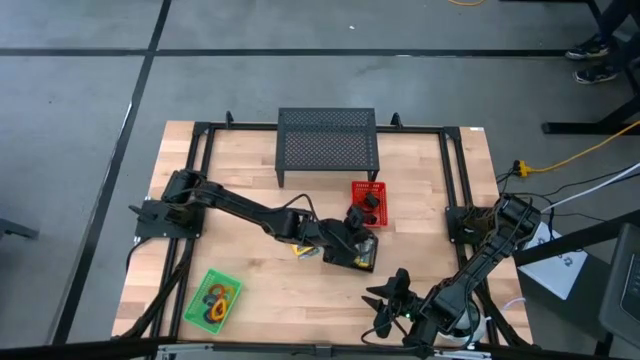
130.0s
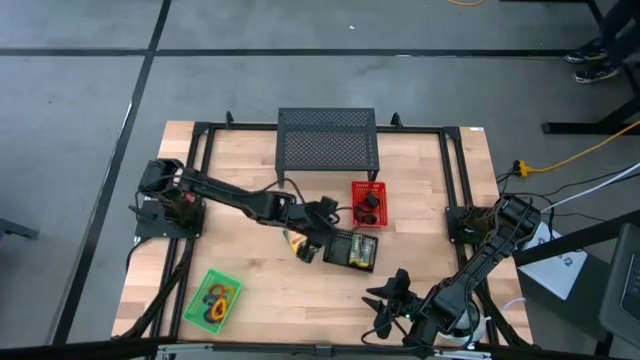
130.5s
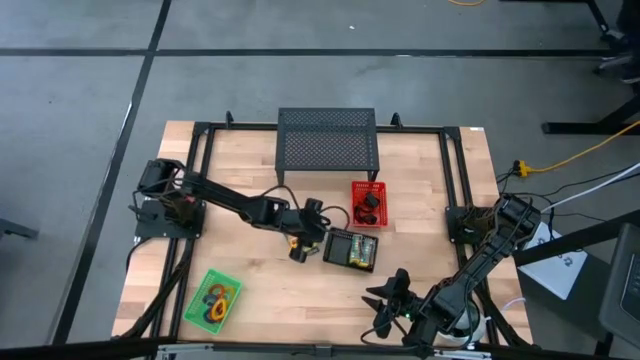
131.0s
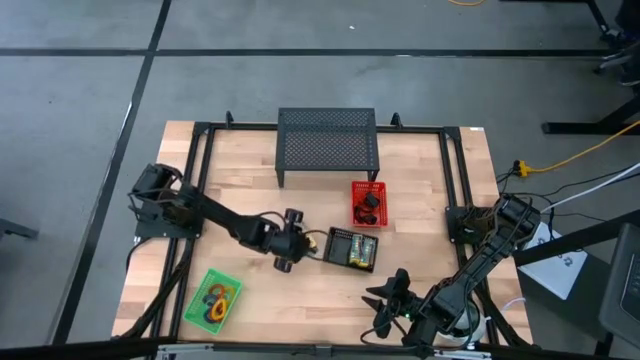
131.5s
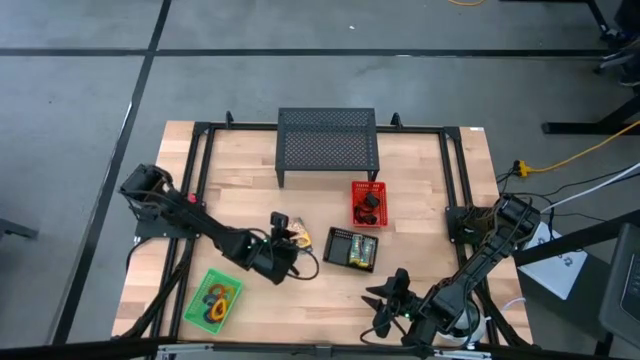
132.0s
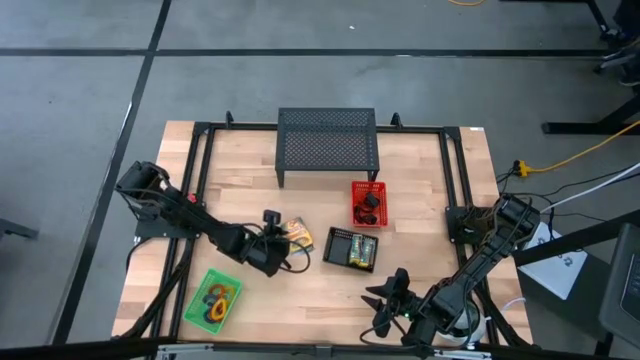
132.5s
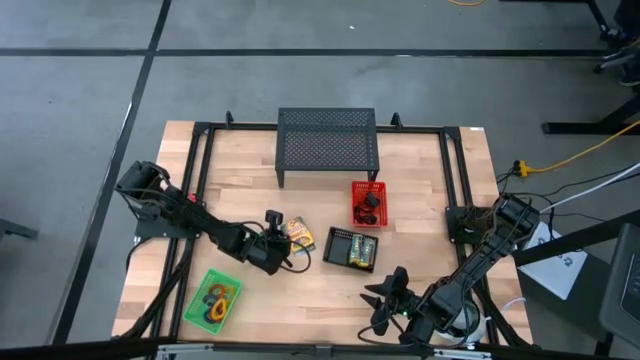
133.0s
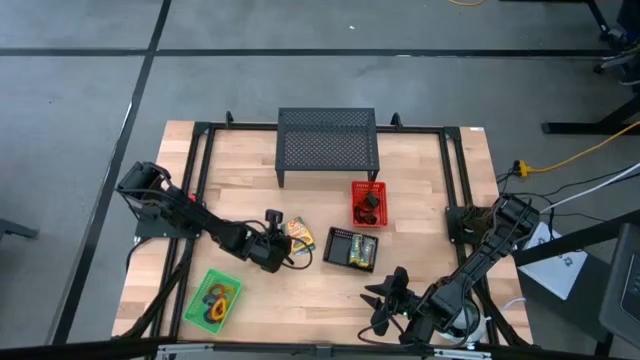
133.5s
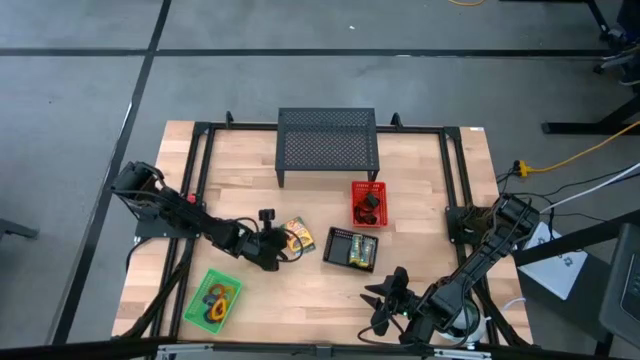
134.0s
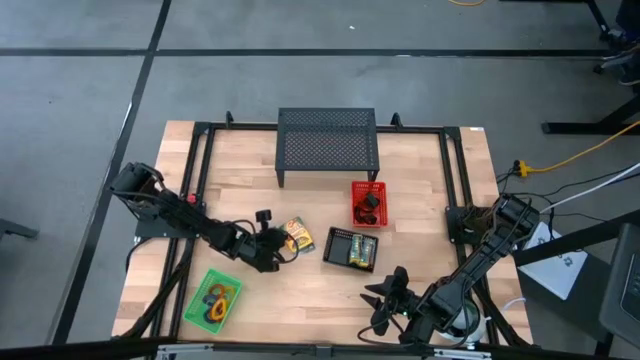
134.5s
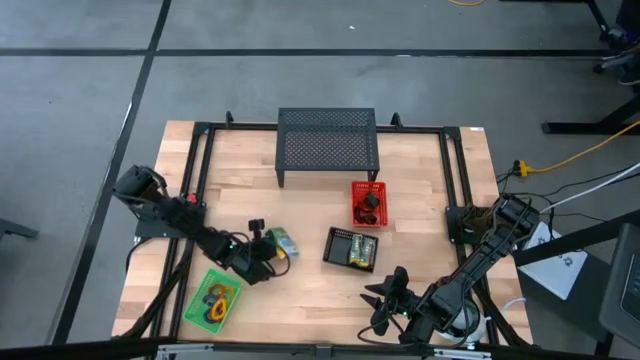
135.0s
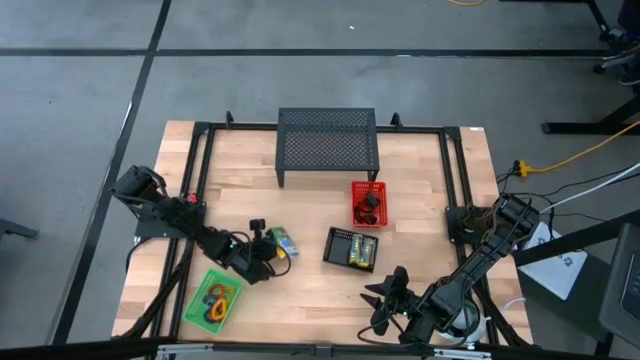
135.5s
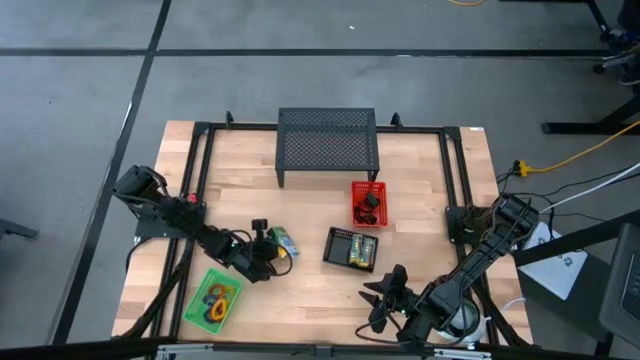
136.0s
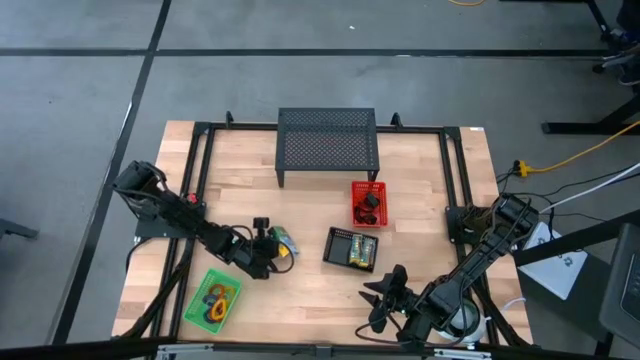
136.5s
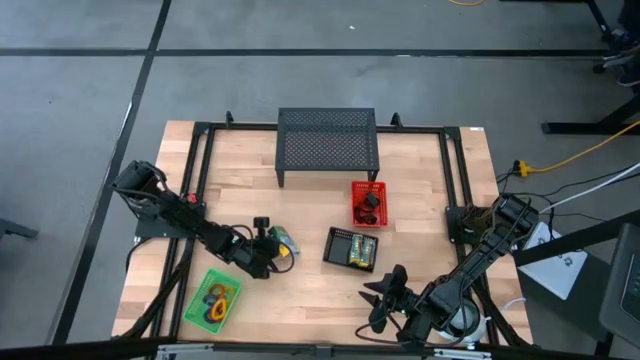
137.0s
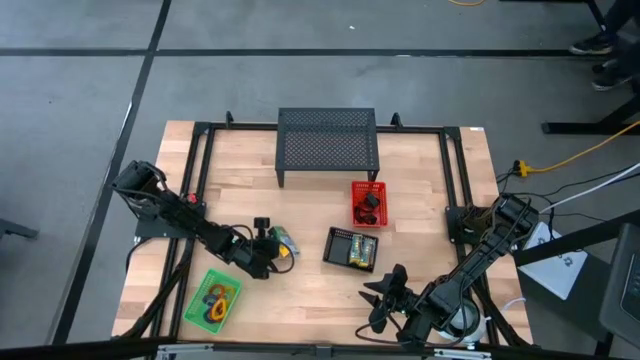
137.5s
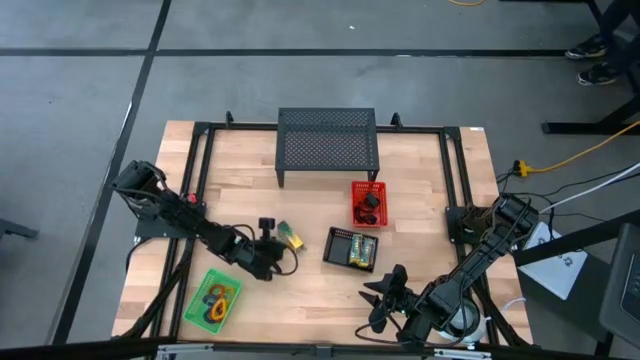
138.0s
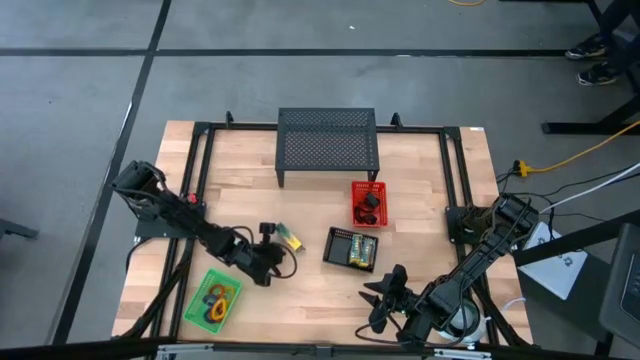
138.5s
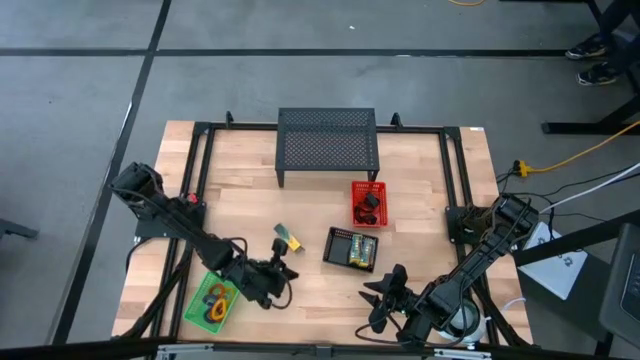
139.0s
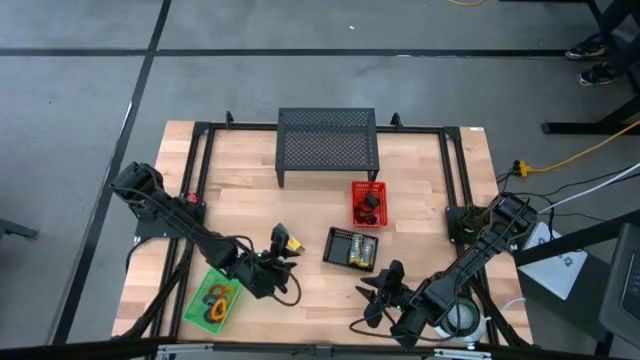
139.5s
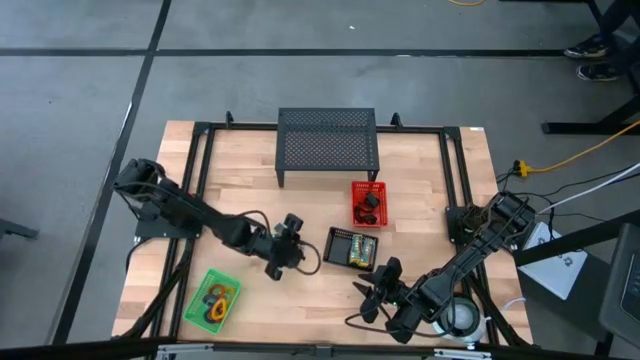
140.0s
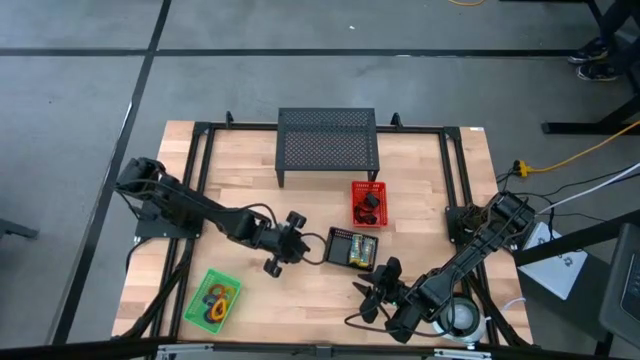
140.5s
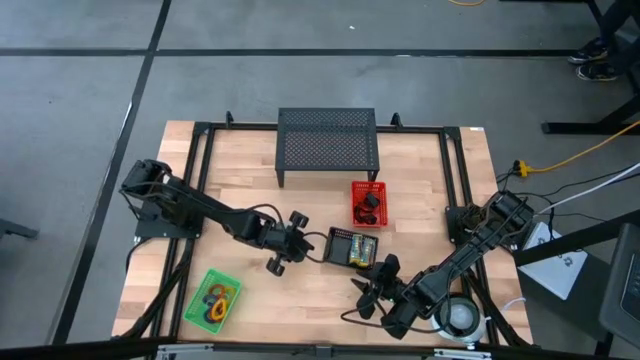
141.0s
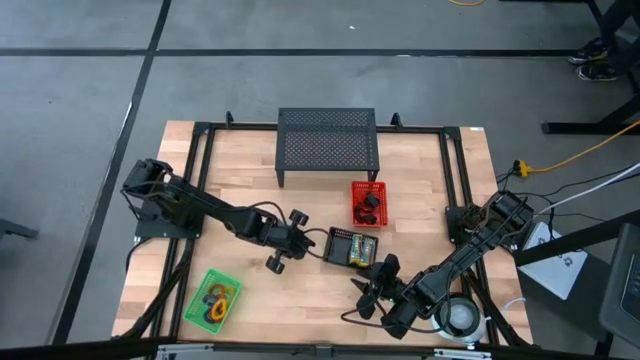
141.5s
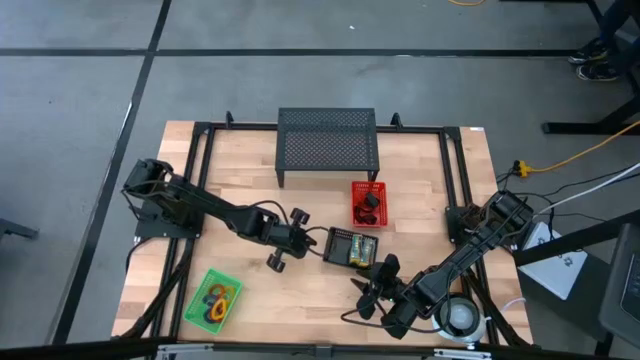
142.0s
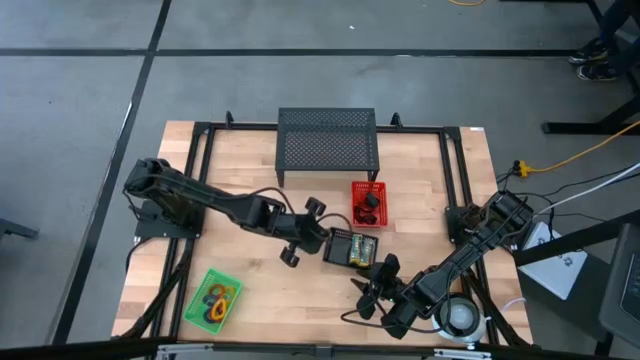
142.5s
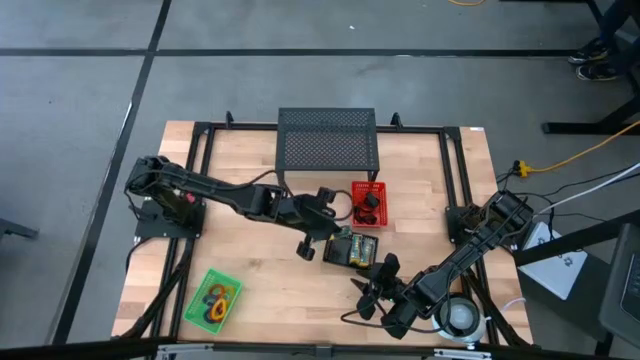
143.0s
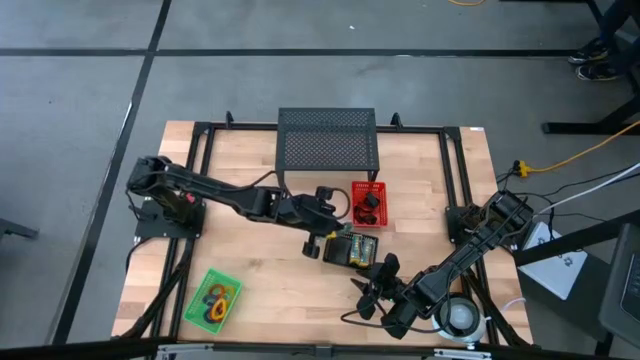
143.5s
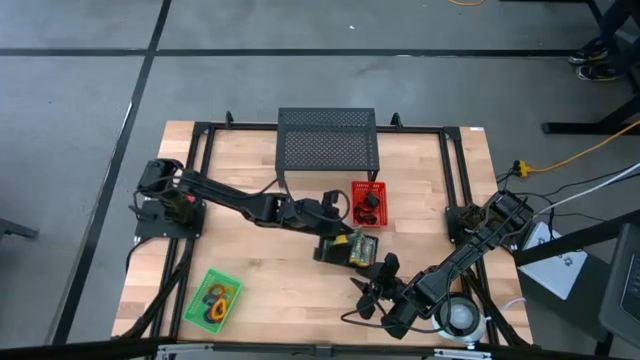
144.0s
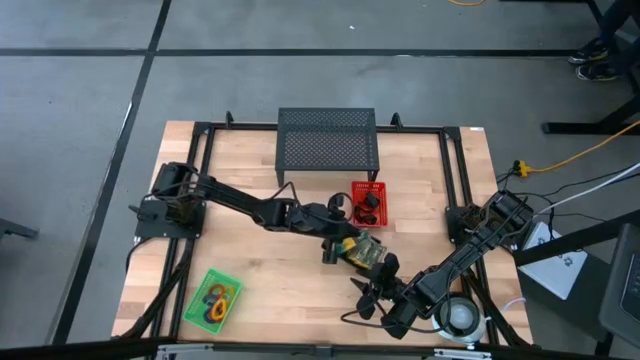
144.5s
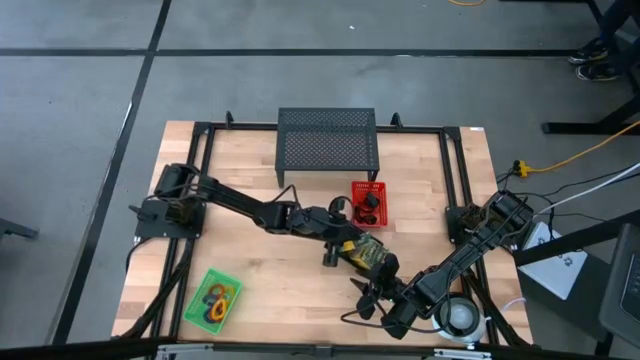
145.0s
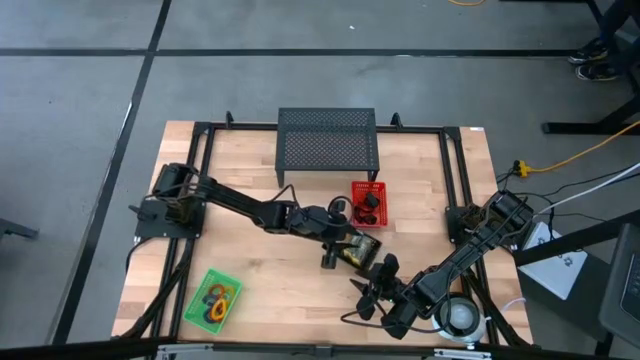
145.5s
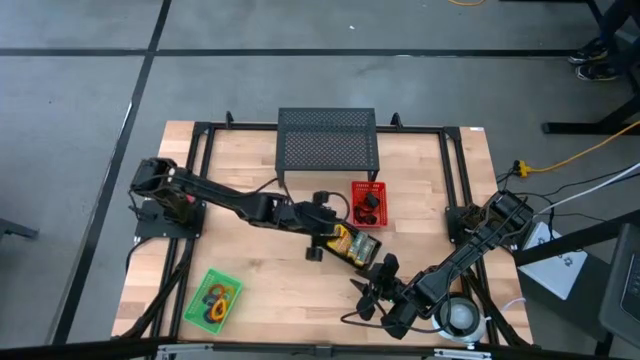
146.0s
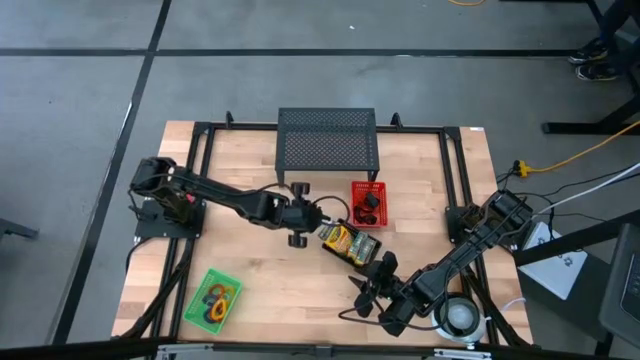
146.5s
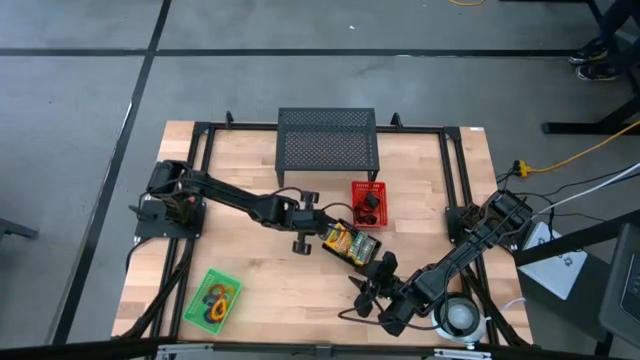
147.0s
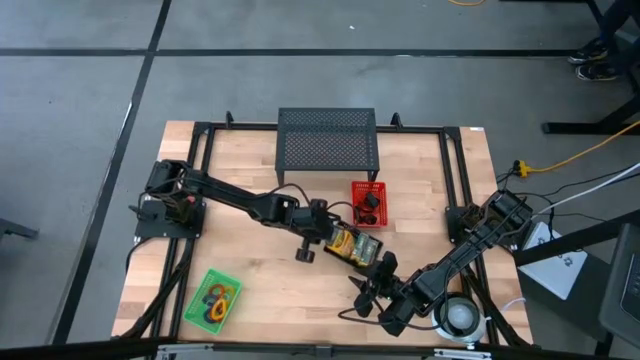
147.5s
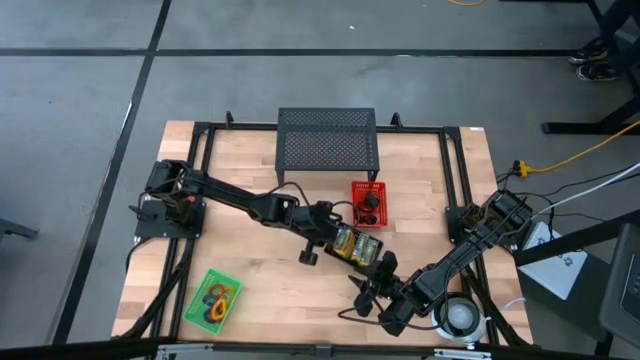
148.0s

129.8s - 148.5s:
Task: Pick & Place Office Desk Supplies
Put the crayon box into the black bin

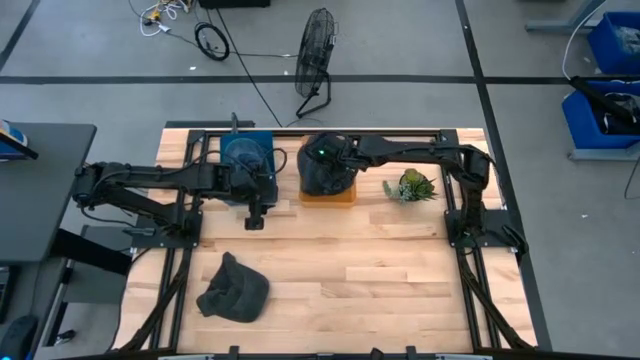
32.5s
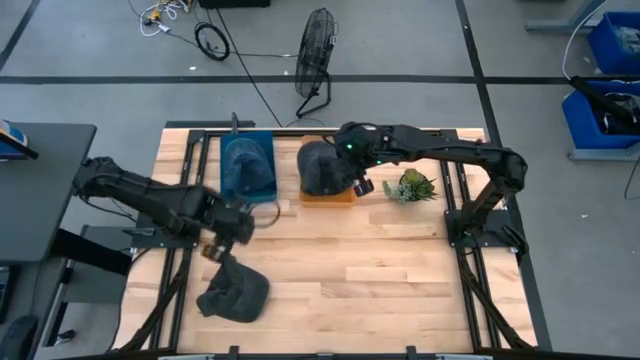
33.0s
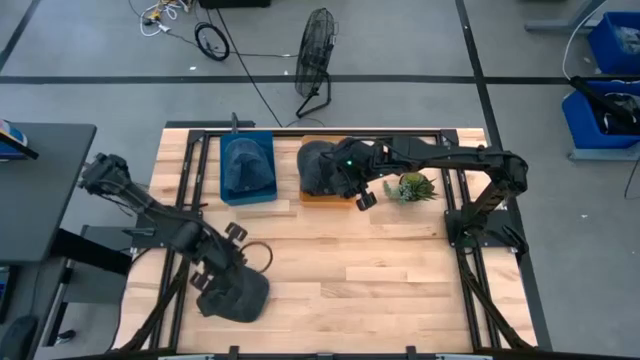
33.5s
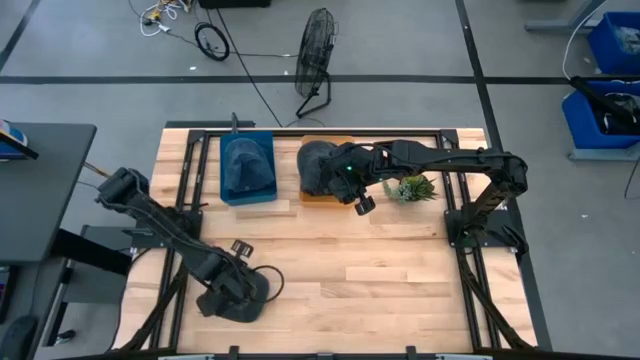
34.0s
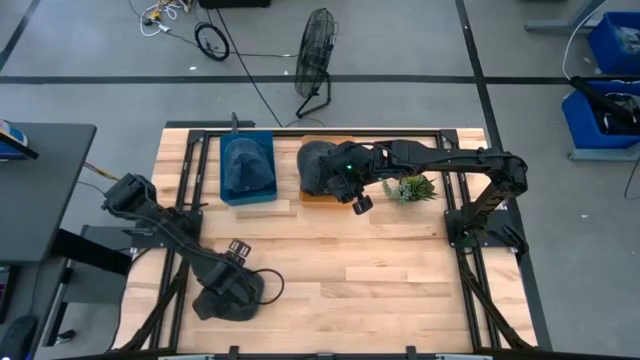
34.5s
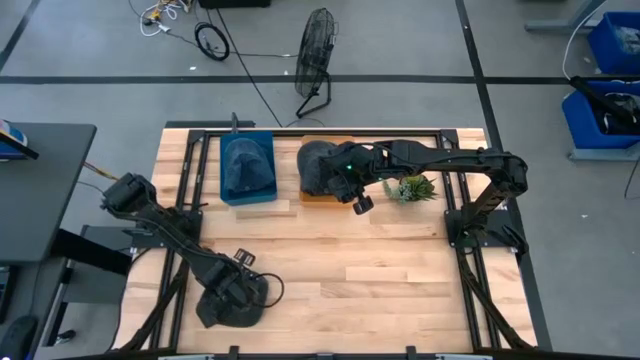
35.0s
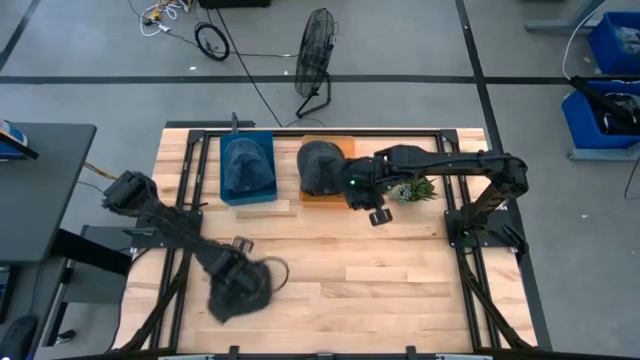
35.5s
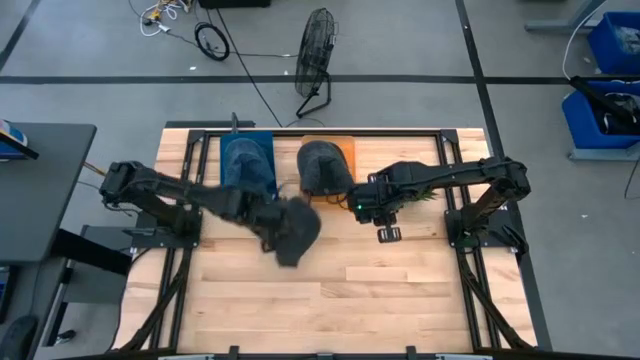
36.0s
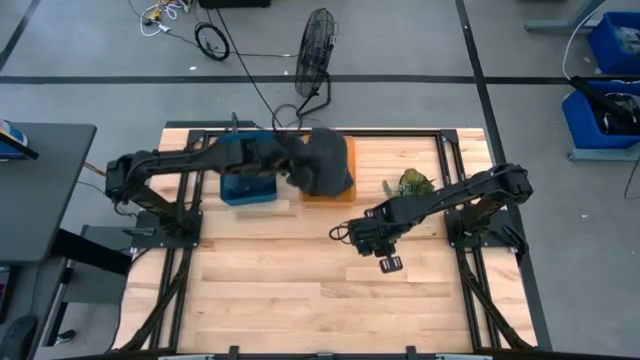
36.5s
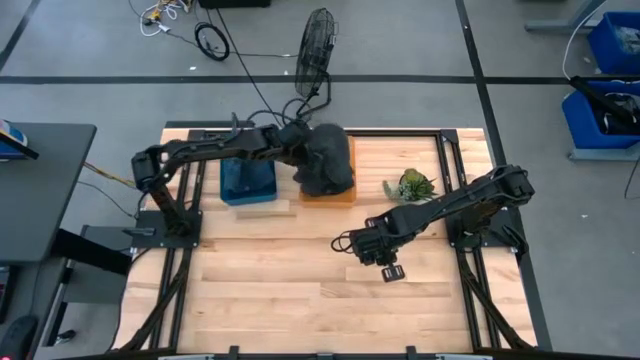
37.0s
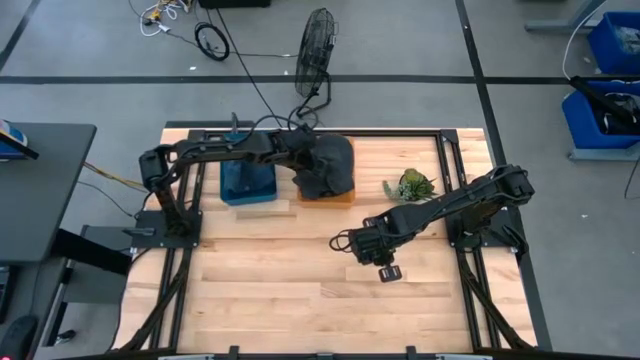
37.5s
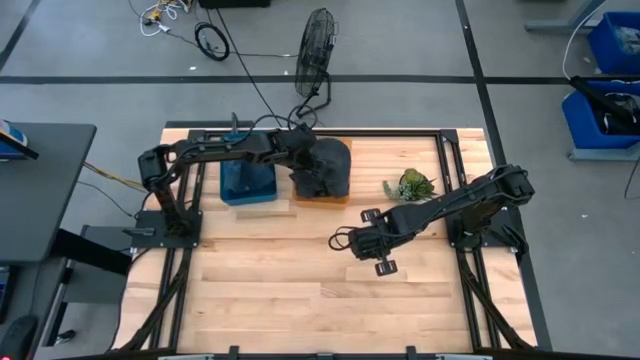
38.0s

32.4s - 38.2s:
Task: Pick & Place hat
Put the black cap into the orange bin
